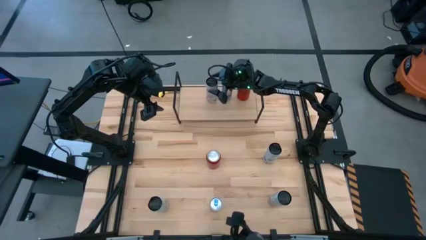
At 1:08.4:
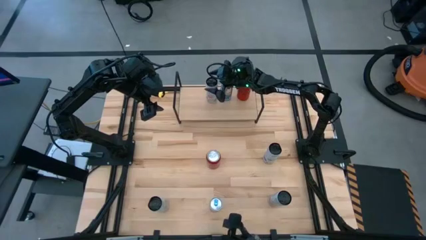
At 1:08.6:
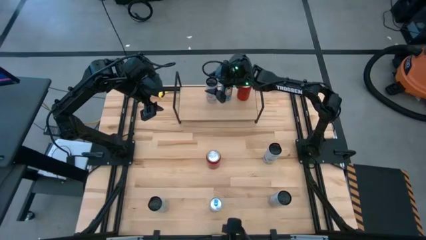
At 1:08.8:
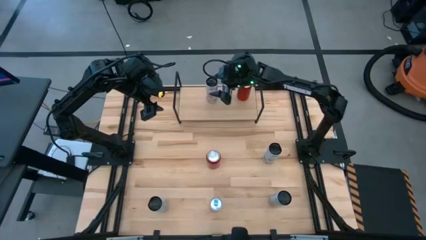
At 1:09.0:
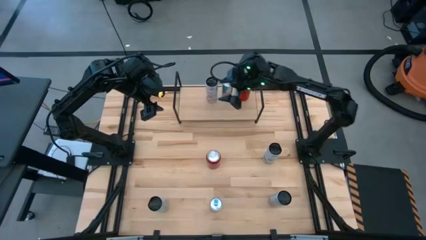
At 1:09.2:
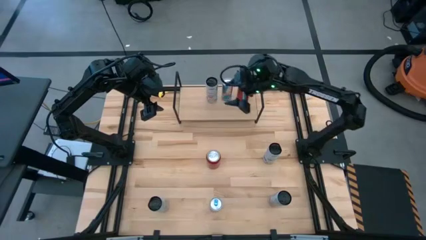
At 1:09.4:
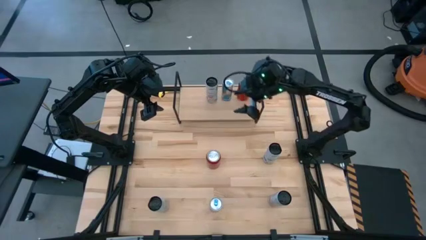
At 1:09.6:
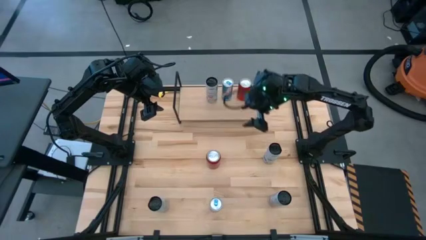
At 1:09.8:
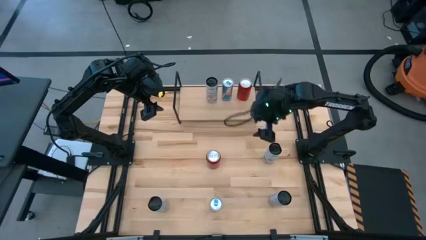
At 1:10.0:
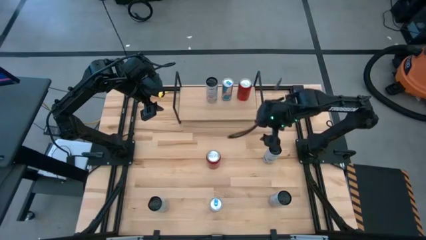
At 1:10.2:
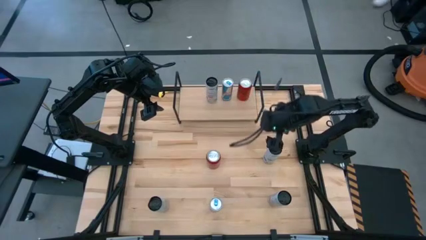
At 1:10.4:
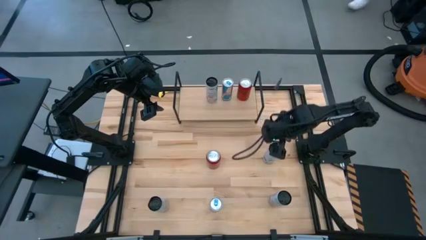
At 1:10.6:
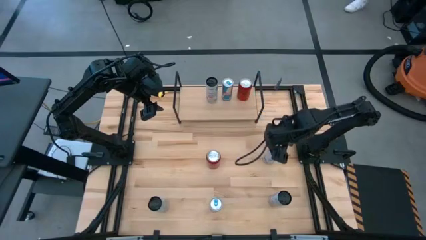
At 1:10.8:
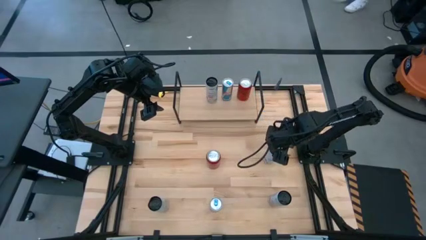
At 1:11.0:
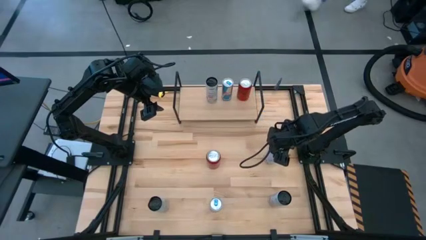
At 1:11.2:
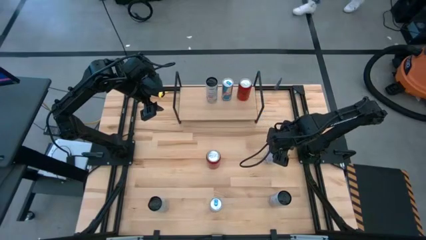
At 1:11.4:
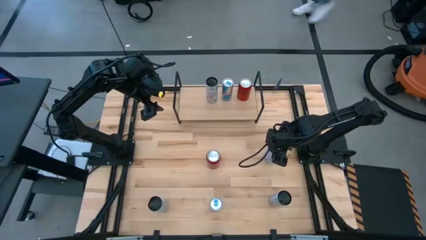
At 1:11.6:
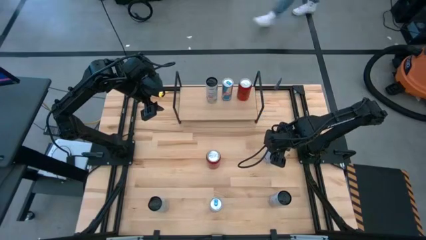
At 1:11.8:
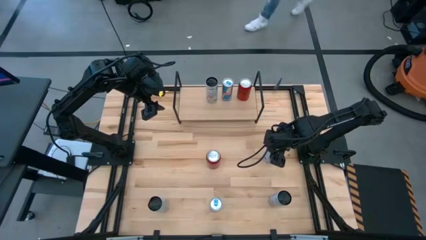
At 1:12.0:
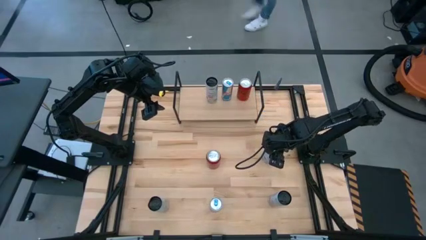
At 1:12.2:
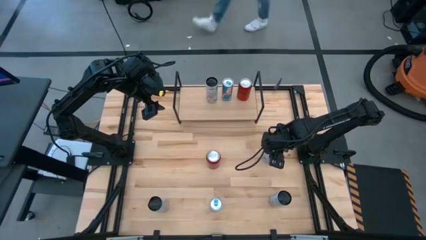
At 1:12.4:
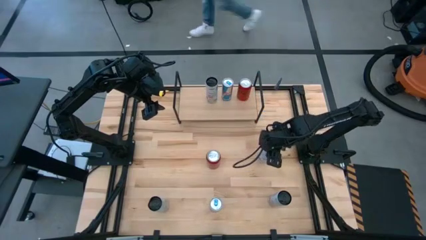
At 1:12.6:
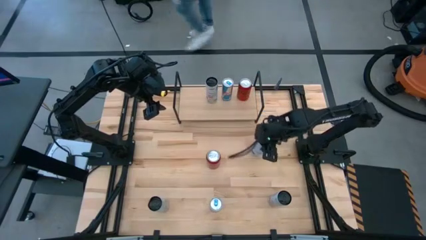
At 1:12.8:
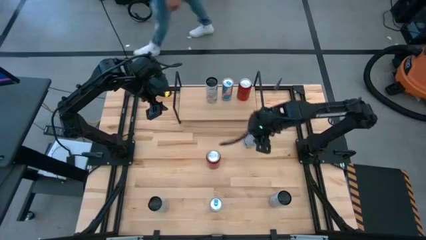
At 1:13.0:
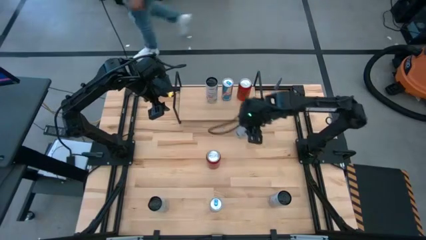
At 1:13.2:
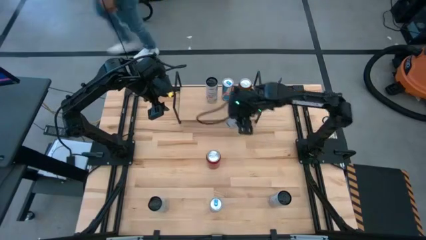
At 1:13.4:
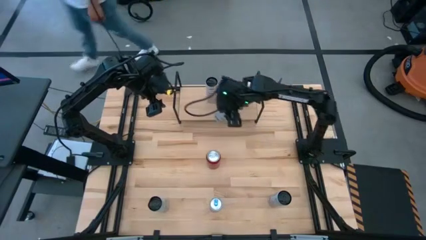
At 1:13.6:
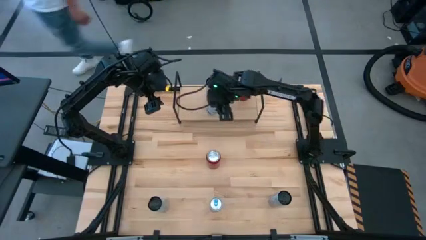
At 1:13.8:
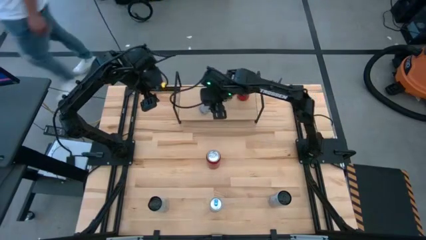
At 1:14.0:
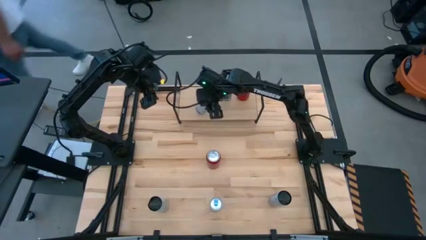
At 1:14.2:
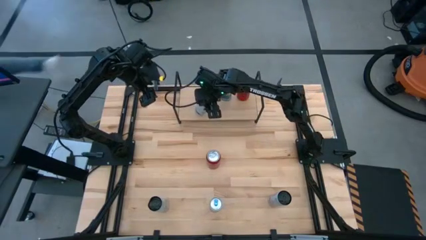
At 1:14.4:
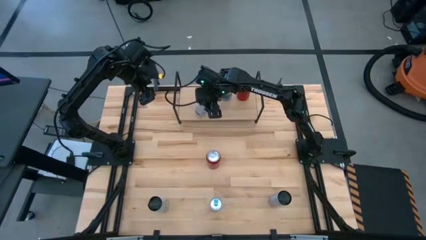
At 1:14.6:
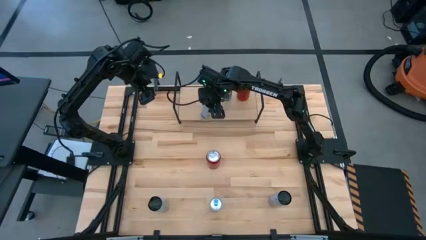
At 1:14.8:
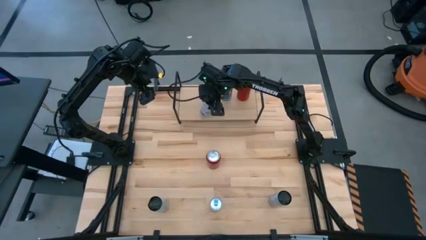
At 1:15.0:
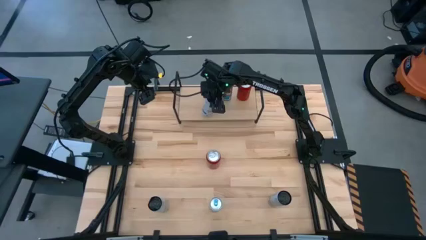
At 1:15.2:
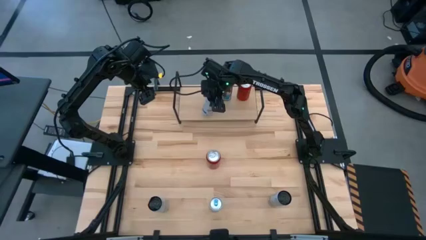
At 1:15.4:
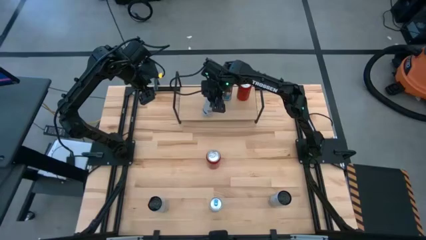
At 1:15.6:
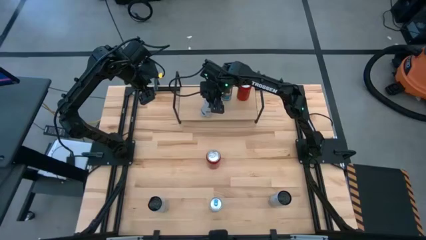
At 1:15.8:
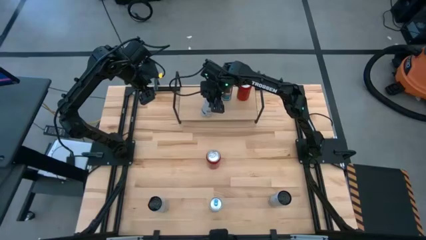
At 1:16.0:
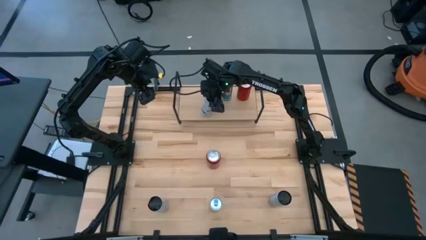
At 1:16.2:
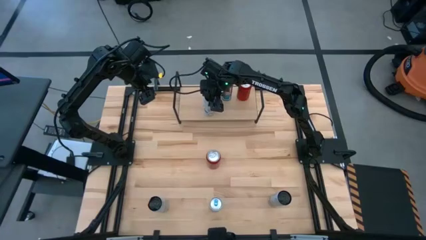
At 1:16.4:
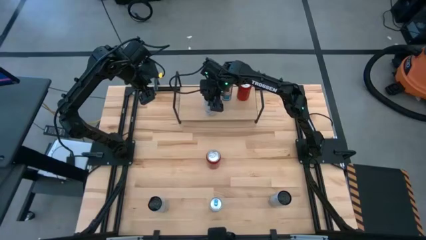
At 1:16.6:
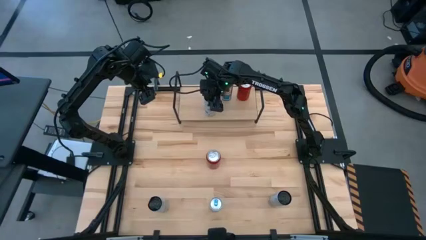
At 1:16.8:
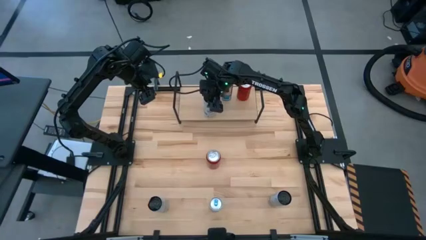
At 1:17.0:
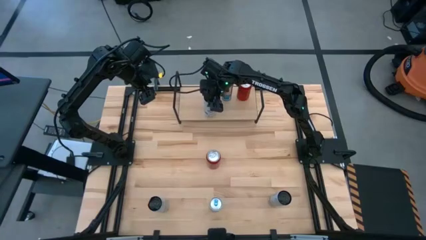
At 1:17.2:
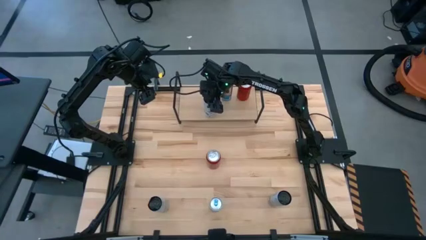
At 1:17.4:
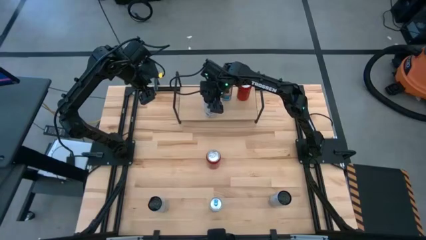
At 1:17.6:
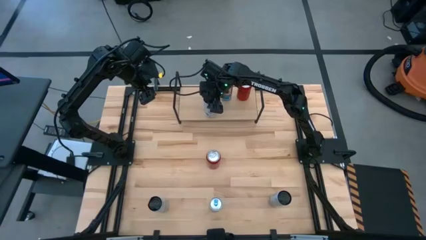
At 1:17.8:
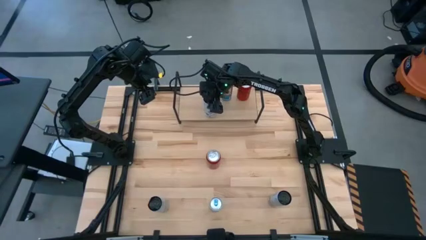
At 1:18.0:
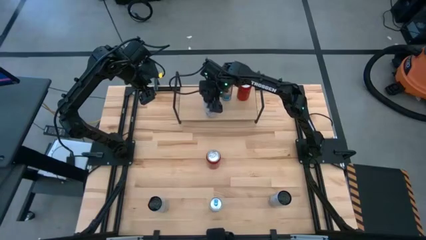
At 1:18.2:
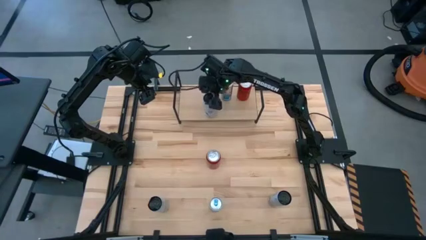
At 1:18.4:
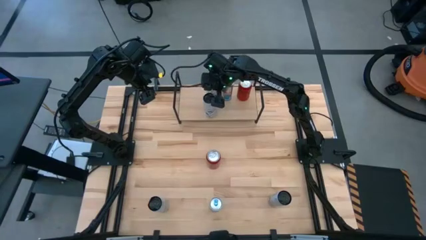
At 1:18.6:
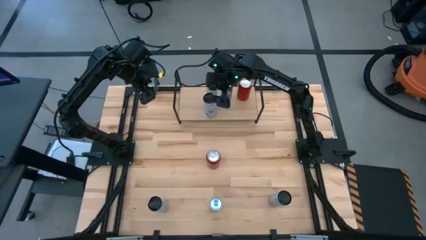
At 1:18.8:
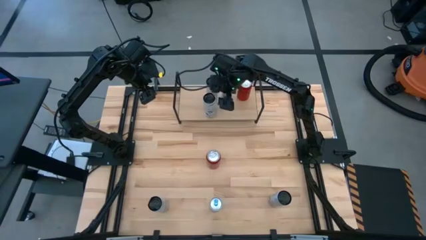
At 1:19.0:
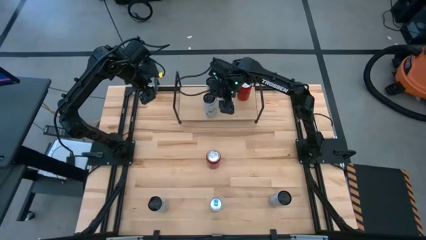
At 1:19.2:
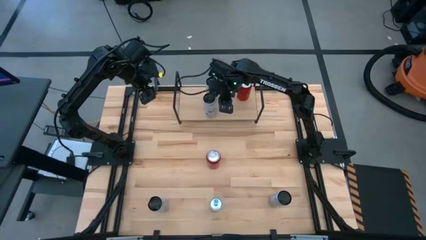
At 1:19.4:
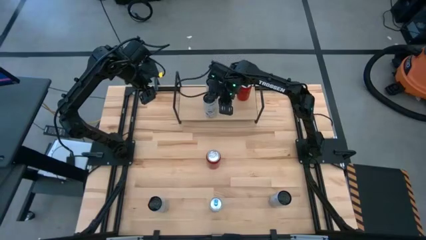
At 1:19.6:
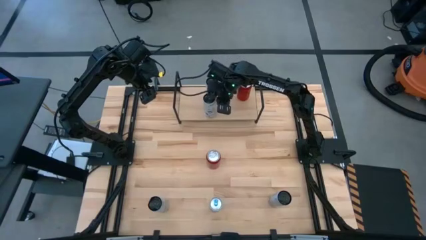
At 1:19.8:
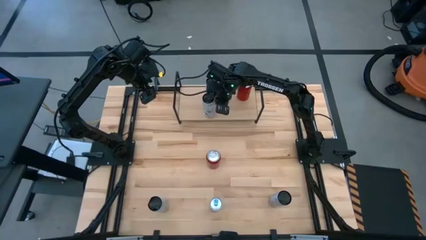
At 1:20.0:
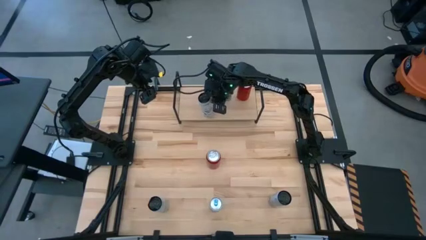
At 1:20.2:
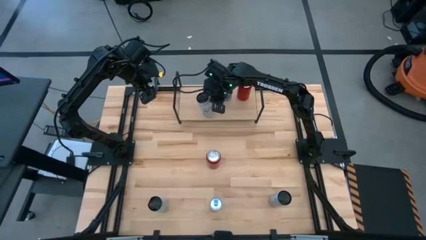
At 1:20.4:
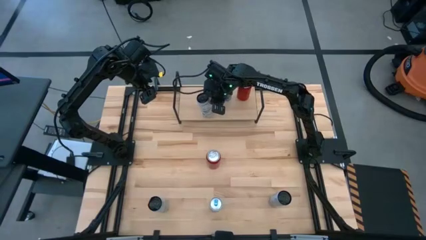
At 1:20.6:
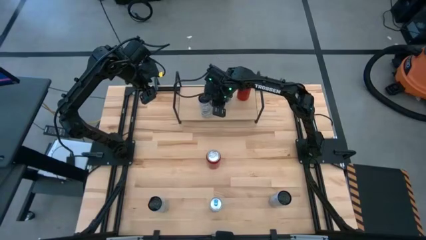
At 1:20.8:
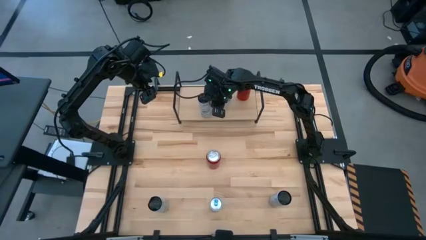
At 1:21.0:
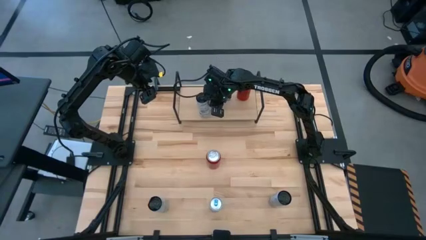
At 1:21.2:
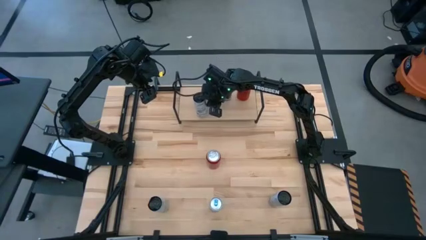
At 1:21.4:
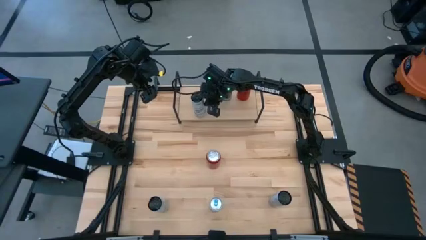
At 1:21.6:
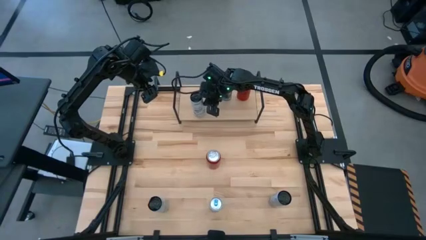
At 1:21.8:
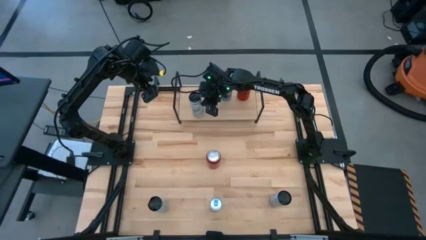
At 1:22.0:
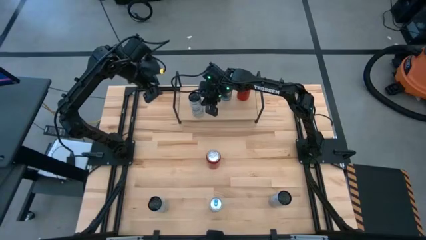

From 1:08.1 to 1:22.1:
Task: Place canned beverage on shelf
Put the top white and blue soda can on the shelf

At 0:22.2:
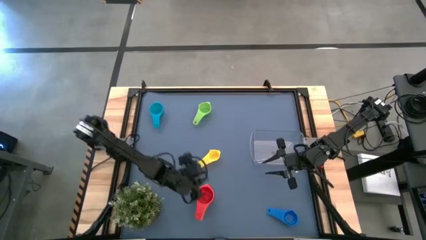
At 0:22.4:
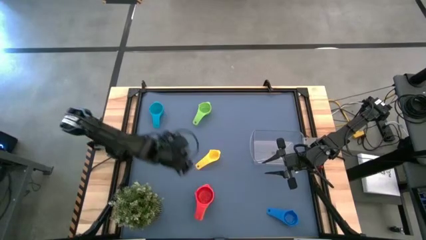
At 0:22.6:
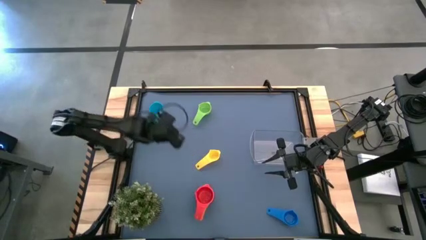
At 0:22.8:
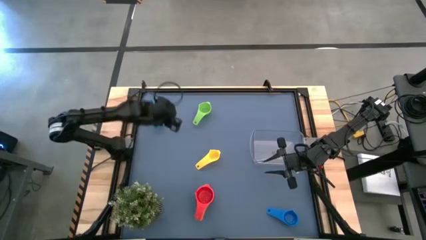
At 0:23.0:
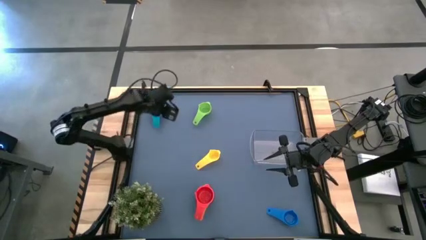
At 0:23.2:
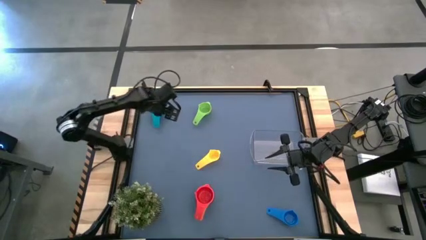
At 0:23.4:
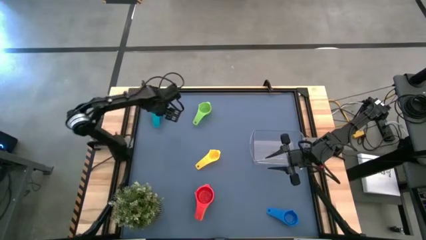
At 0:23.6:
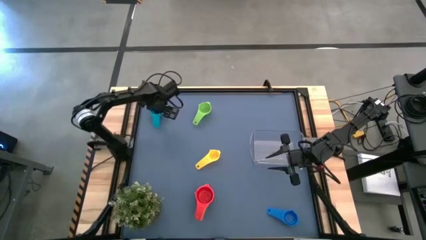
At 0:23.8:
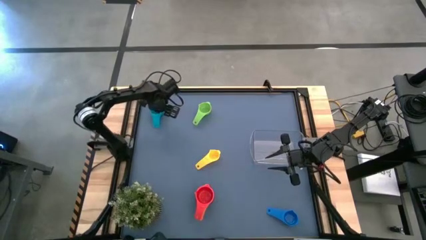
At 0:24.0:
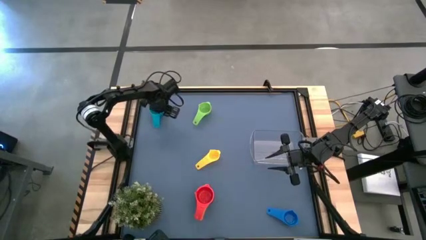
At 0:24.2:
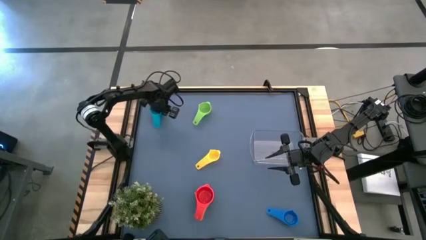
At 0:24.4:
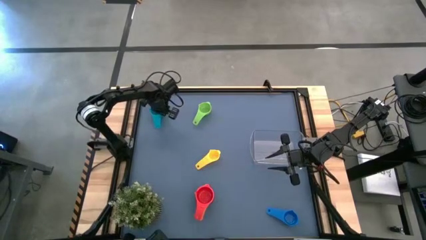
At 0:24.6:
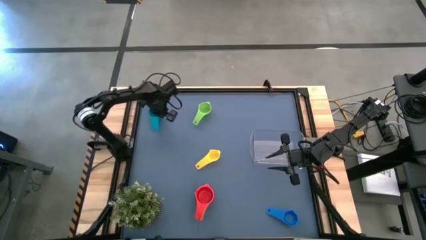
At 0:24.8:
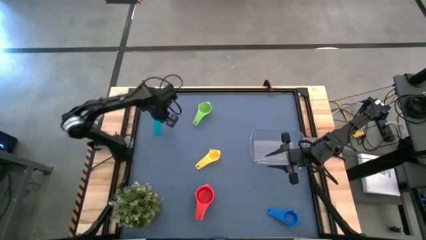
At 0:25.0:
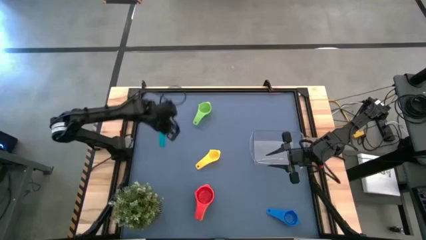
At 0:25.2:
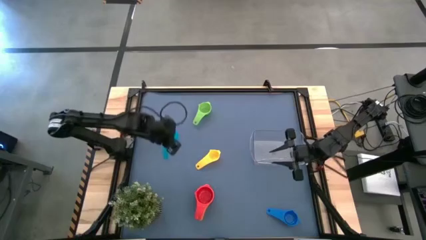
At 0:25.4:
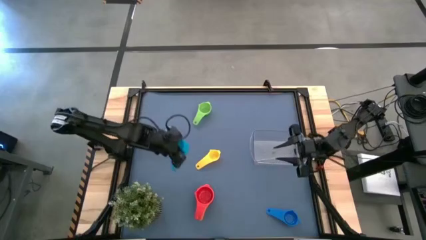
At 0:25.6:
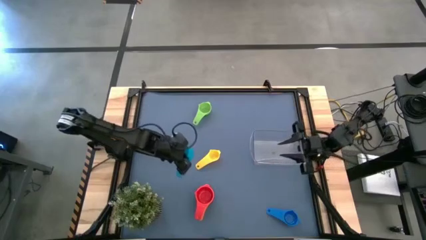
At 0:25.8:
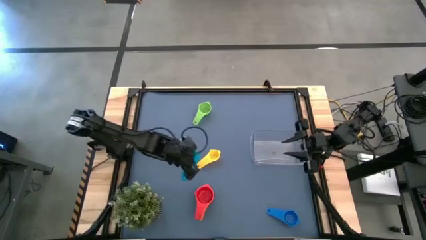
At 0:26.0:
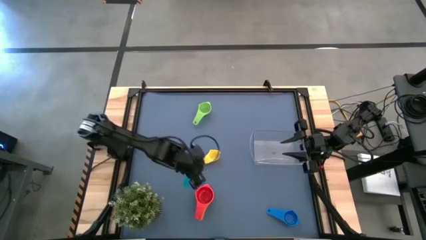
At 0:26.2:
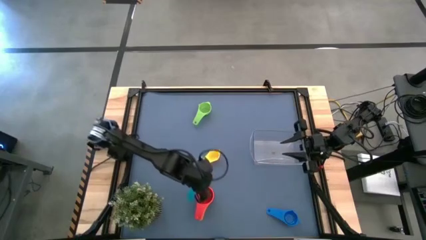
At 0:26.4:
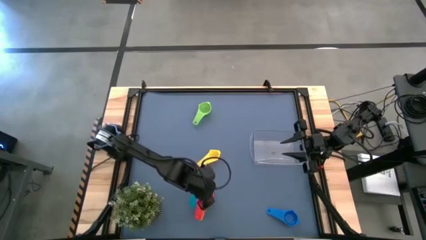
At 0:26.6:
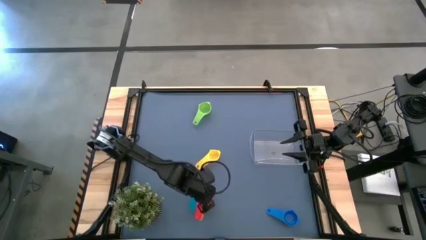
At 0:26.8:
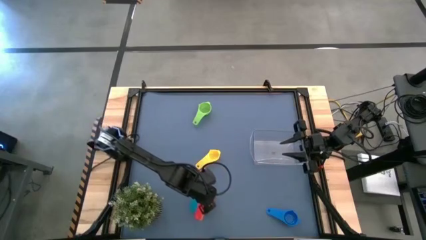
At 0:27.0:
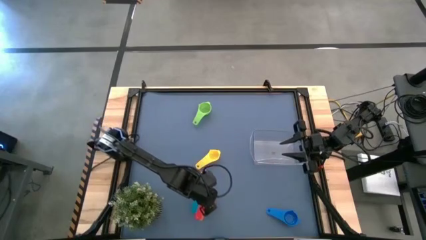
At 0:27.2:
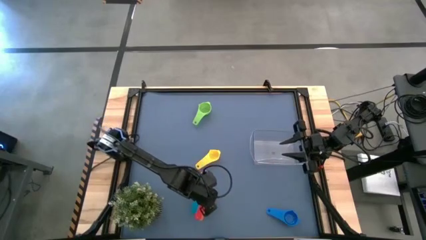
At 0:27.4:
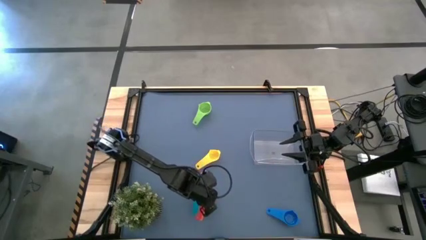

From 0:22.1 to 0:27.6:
Task: Nest measuring cups in basket
Stack the light blue measuring cup on top of the red measuring cup
